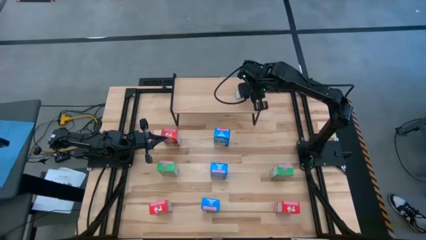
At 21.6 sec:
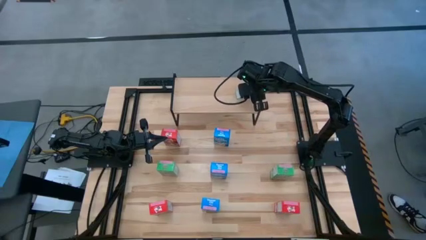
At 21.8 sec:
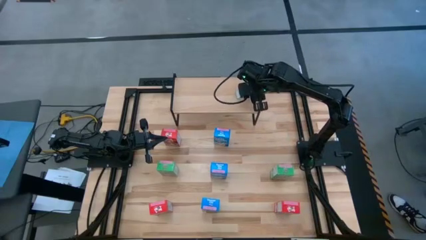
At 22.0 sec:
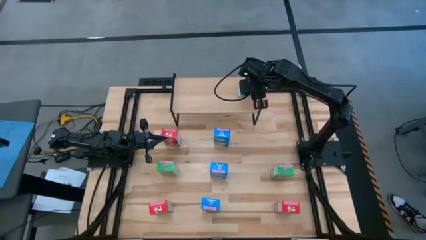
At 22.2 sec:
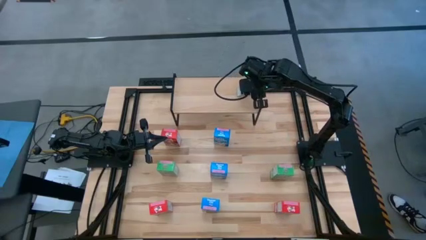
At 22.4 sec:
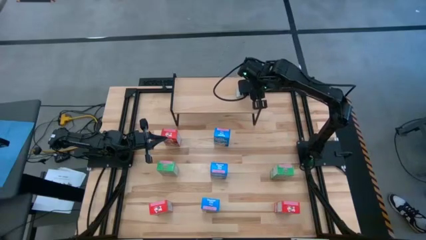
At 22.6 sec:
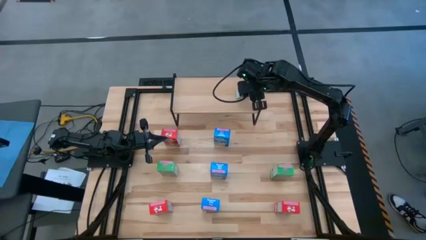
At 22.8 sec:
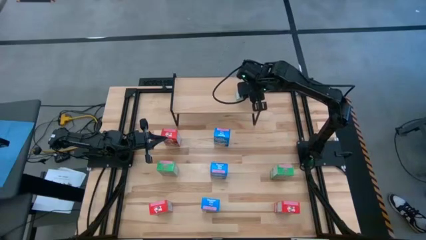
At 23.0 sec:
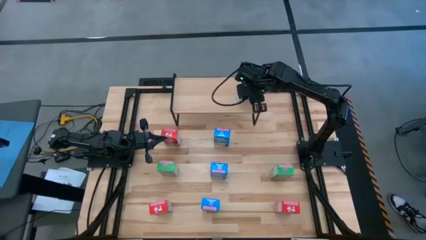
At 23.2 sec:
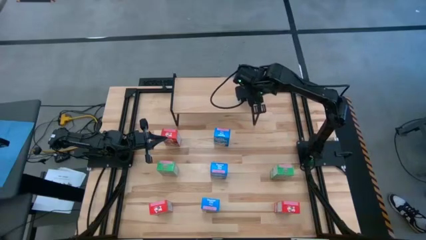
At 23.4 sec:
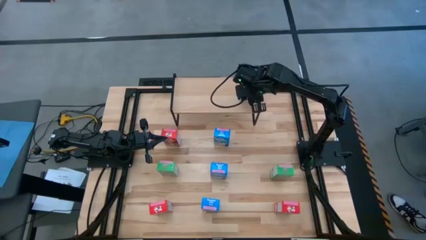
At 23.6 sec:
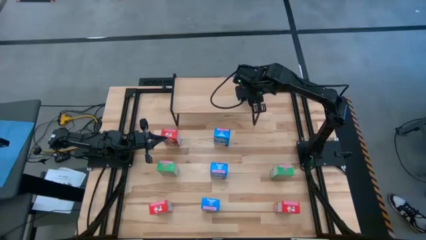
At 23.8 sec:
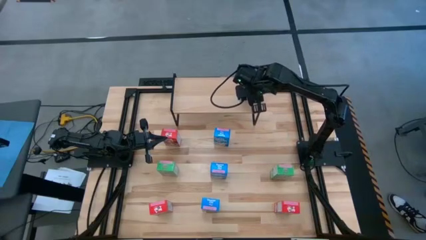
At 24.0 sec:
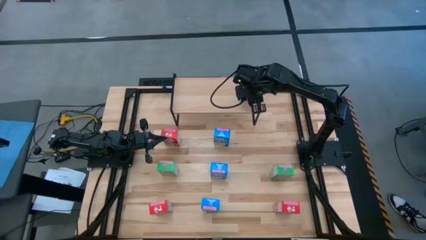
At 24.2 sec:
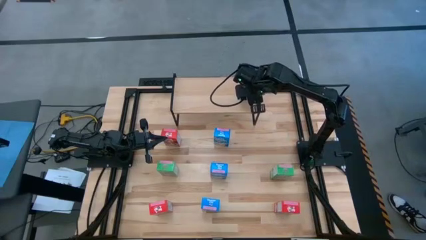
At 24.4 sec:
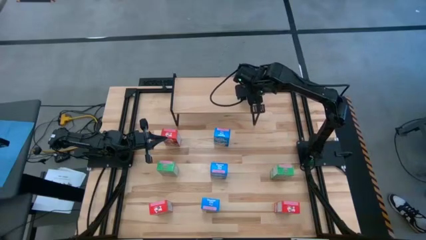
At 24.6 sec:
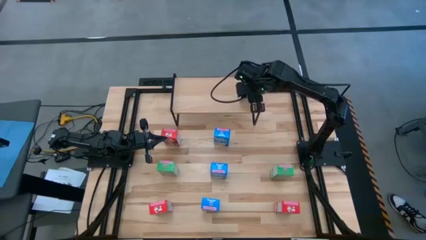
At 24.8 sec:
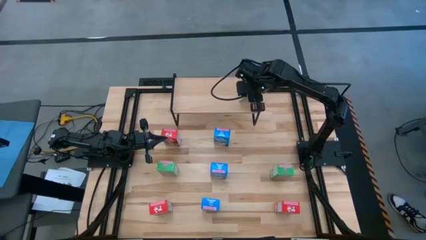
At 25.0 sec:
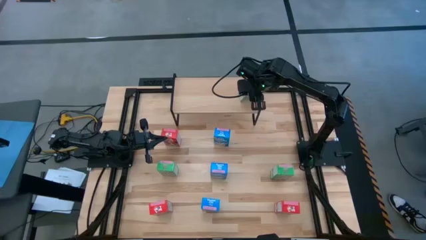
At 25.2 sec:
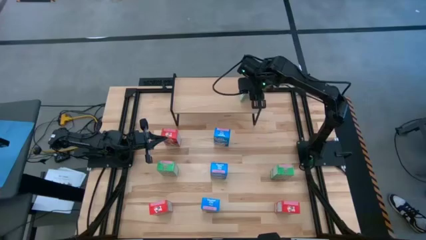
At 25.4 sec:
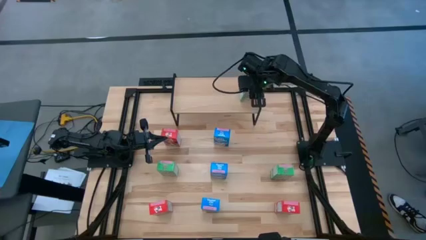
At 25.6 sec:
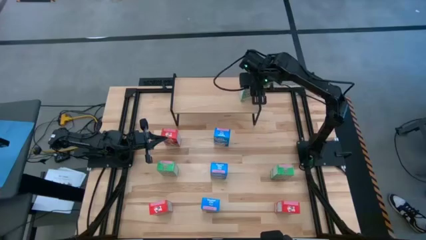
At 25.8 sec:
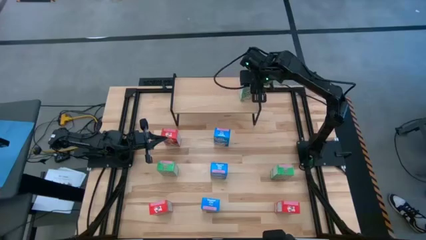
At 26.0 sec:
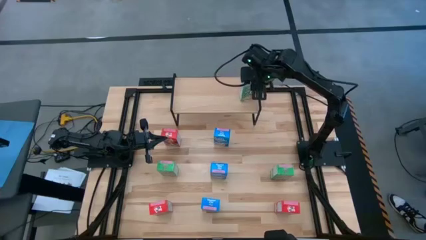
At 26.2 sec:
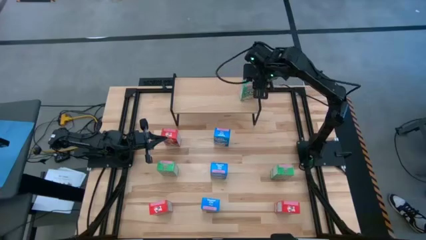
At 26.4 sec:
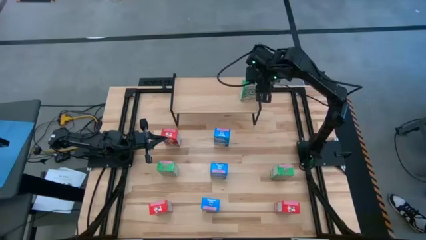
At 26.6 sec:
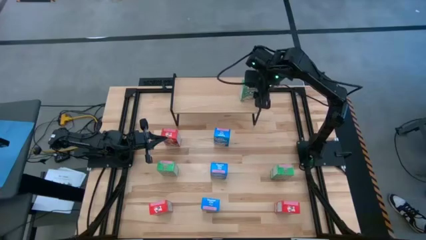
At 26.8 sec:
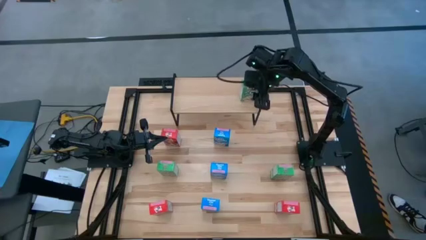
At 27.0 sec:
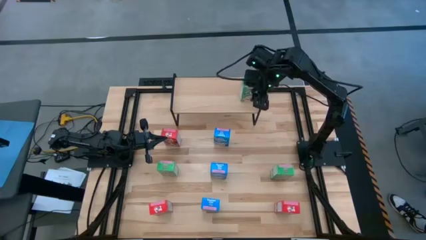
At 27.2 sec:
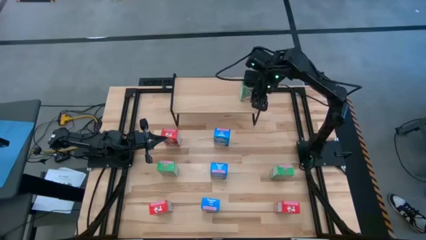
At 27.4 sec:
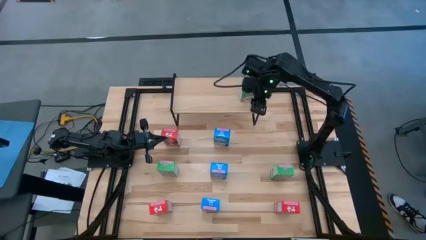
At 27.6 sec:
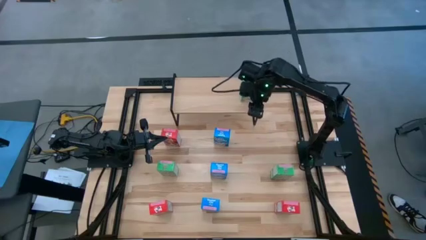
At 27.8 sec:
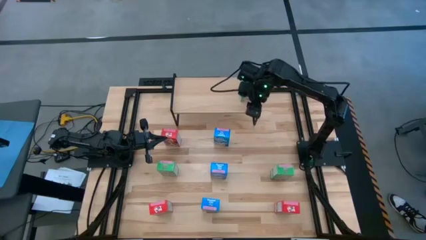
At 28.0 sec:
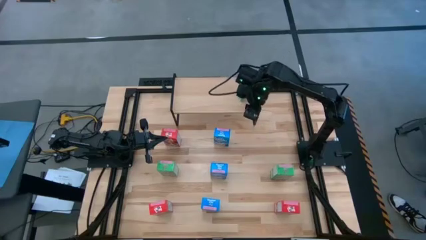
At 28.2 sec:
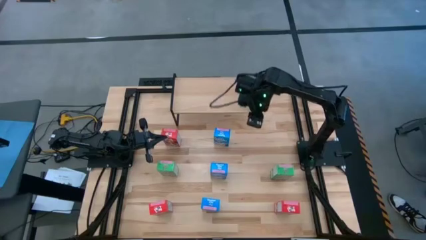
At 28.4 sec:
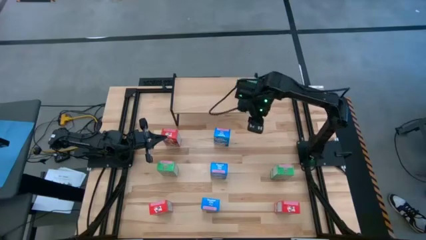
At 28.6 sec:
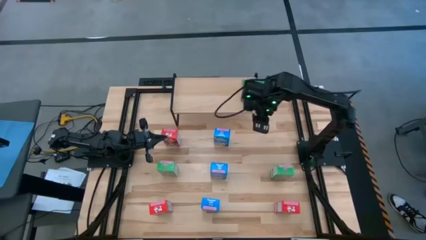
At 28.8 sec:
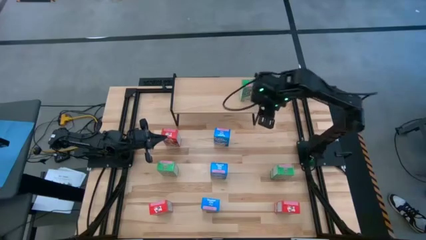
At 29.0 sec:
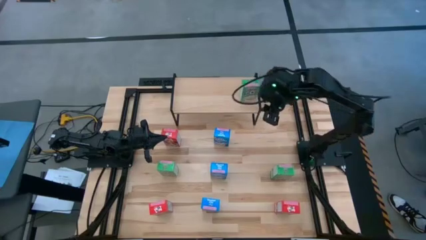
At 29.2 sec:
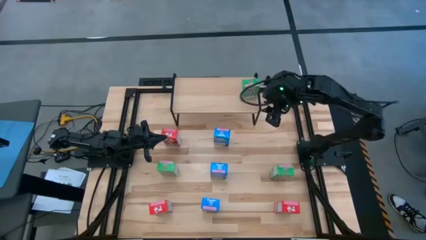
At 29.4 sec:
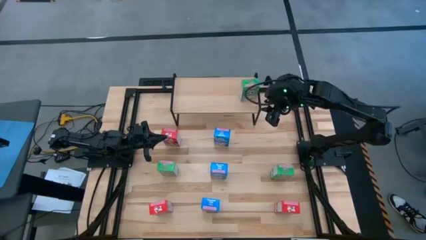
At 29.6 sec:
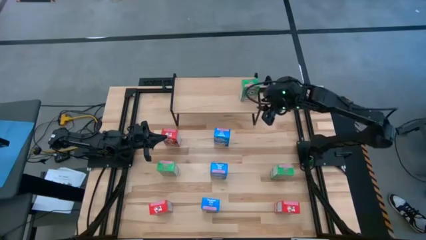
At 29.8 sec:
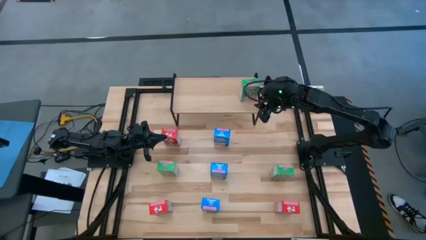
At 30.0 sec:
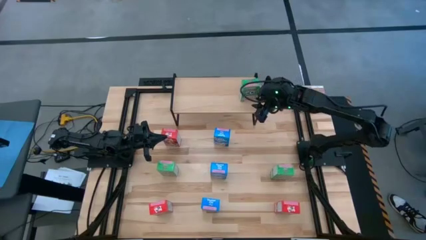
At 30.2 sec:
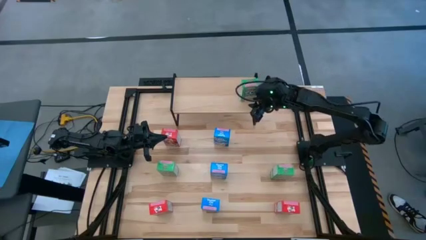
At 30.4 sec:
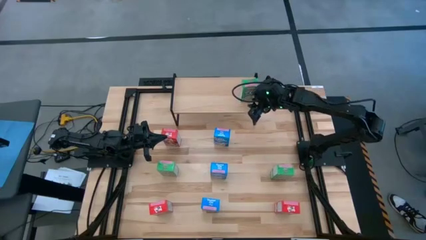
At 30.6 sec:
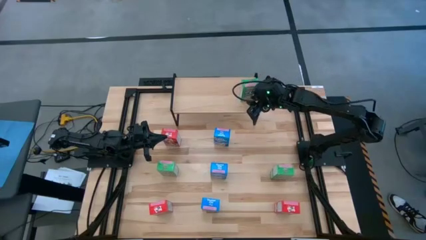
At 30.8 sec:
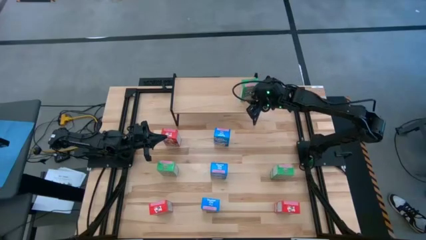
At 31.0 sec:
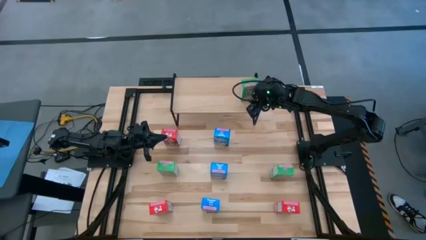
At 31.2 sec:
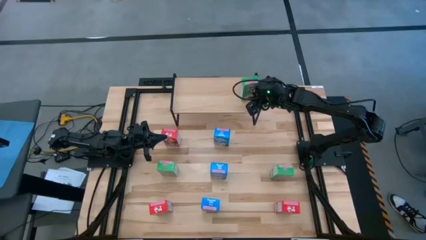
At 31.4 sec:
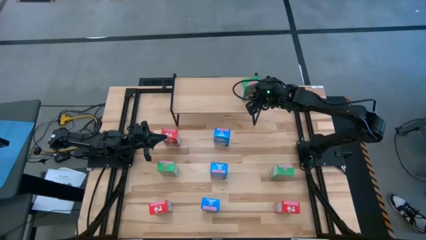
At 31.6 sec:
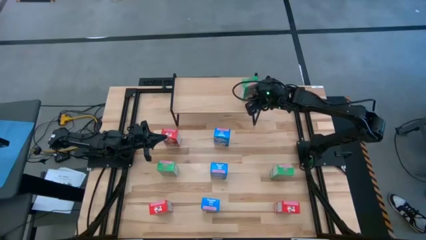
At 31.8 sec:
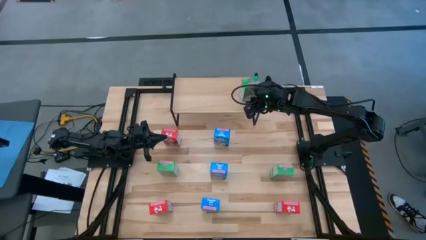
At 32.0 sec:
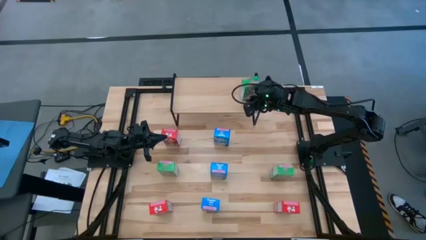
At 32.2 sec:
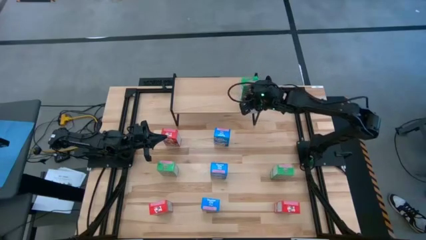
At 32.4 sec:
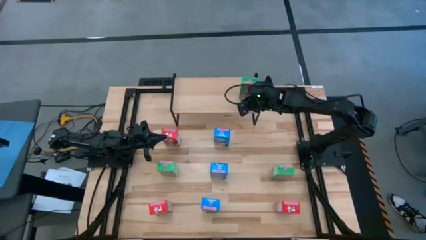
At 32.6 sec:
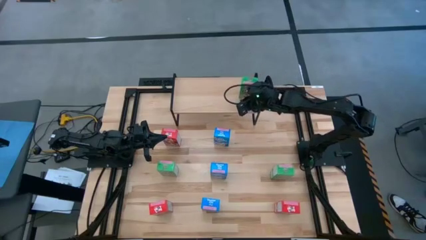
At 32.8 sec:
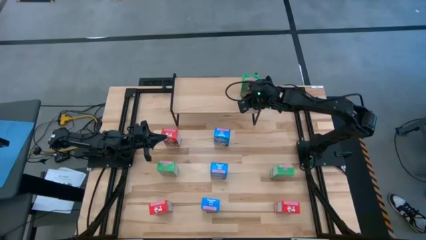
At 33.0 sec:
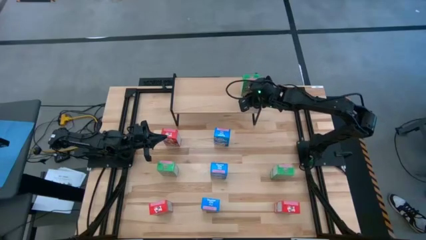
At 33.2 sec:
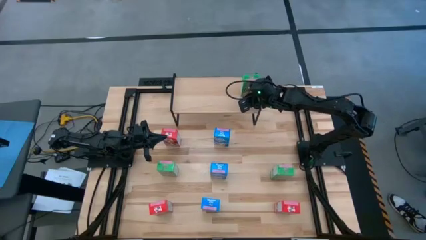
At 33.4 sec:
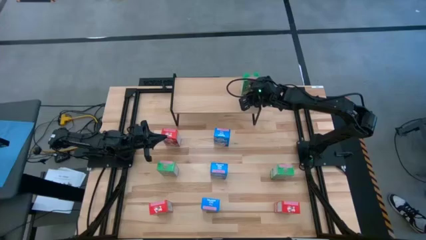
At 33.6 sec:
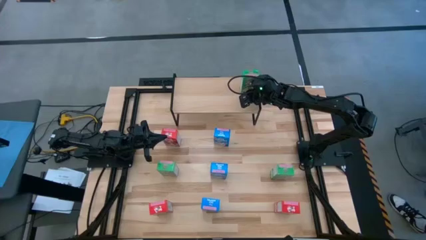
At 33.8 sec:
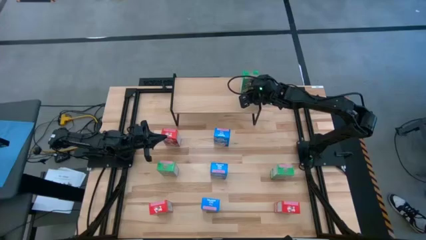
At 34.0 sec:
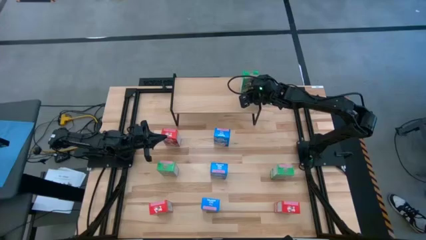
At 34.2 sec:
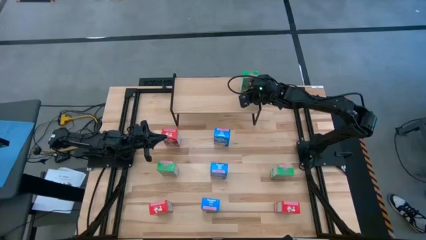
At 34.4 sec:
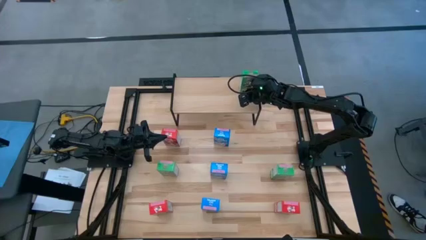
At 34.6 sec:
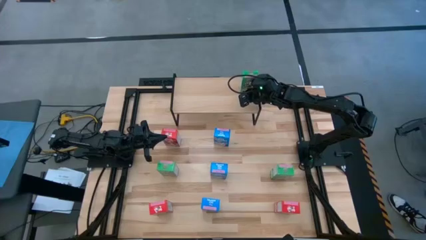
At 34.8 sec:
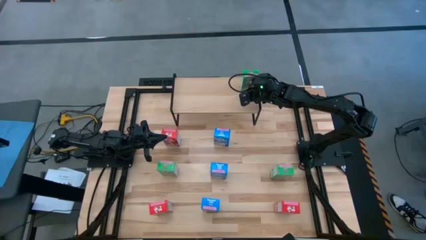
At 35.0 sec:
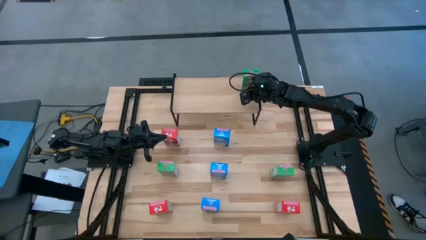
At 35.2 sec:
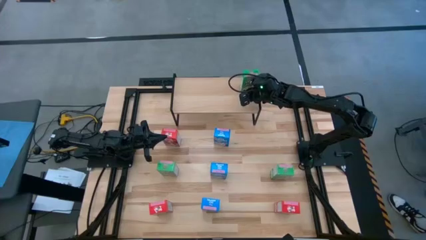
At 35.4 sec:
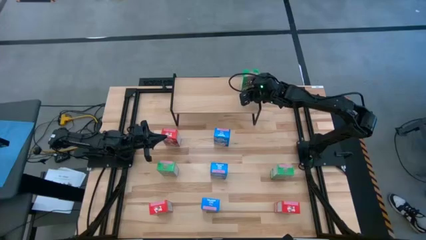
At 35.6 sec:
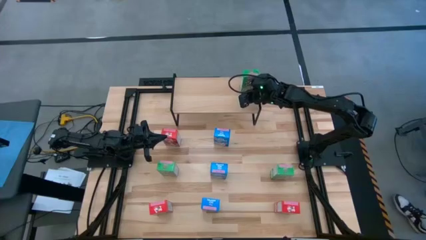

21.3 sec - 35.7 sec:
Task: Stack cereal on shelf
Put the top green cereal box on the shelf
